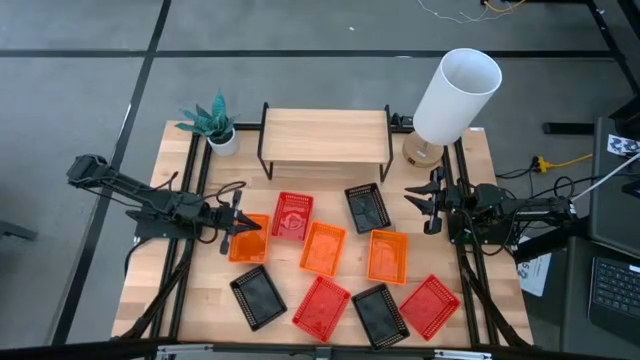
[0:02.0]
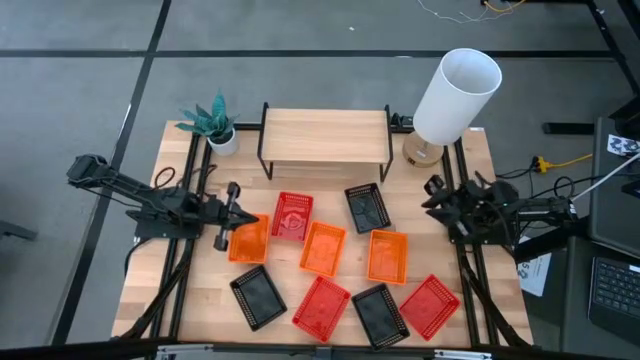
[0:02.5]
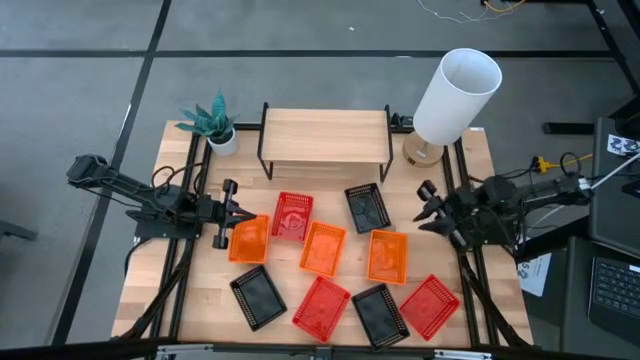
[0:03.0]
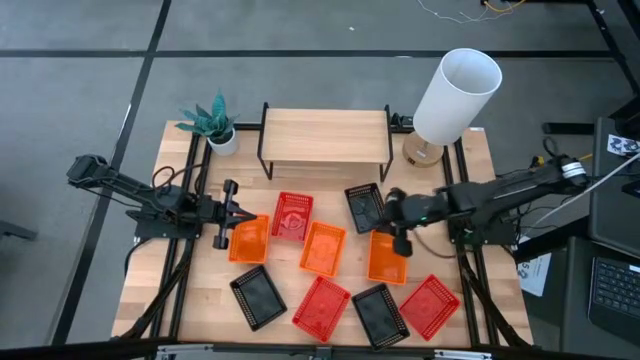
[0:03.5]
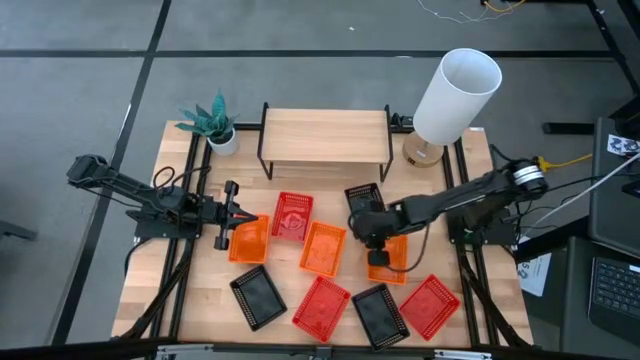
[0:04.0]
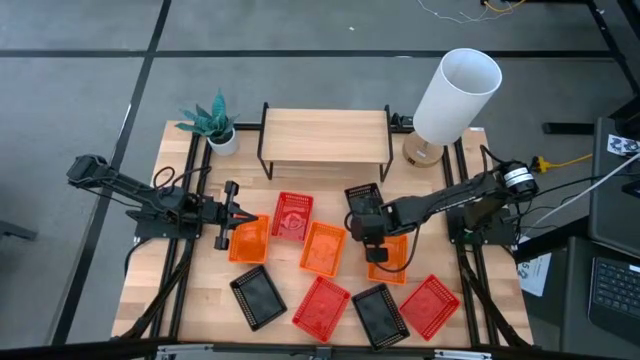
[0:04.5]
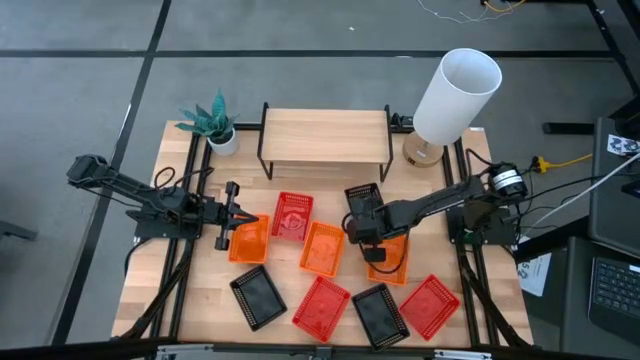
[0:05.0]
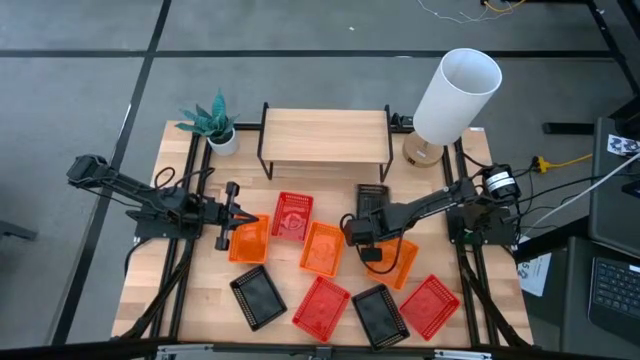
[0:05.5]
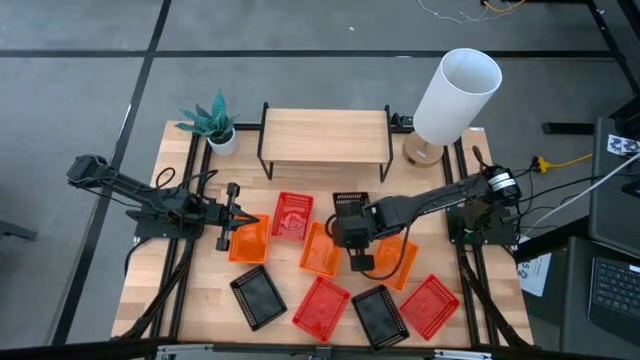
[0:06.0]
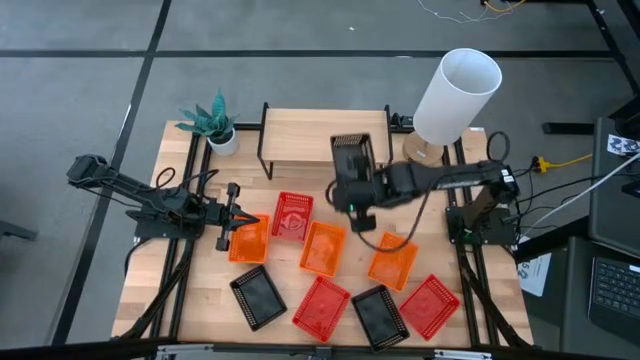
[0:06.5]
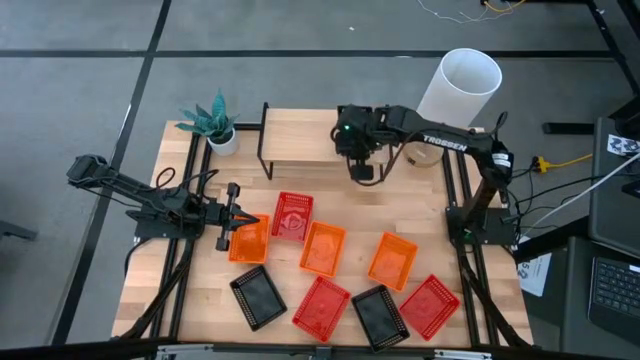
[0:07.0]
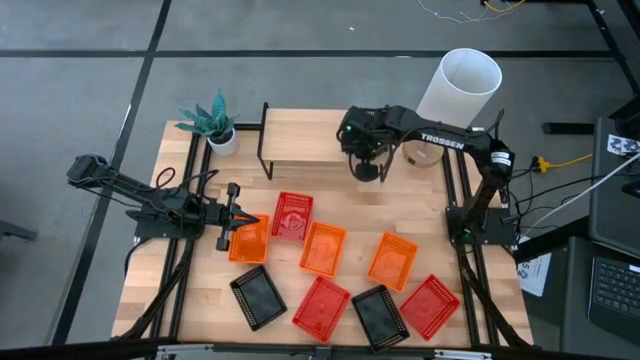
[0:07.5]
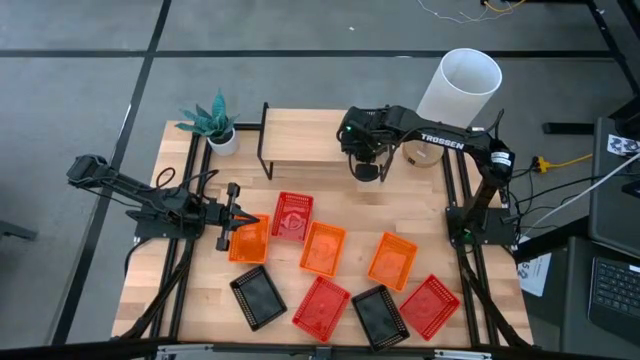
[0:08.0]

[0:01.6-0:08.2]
Task: Stack baskets on shelf by color
Put the top black bin on the shelf

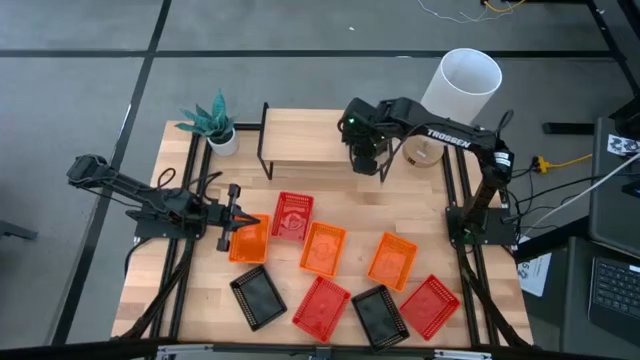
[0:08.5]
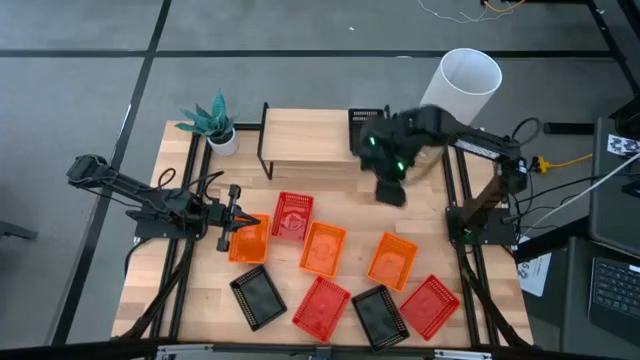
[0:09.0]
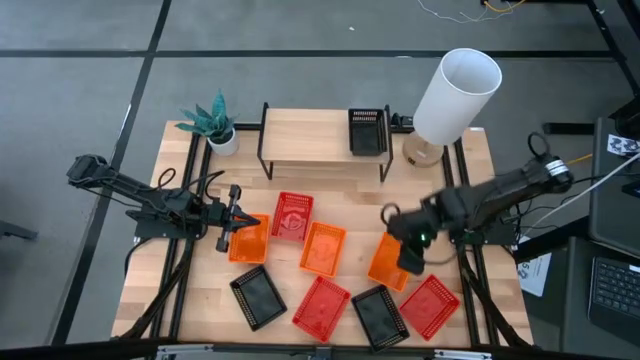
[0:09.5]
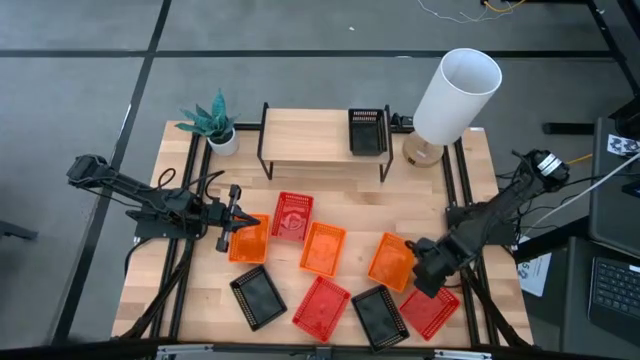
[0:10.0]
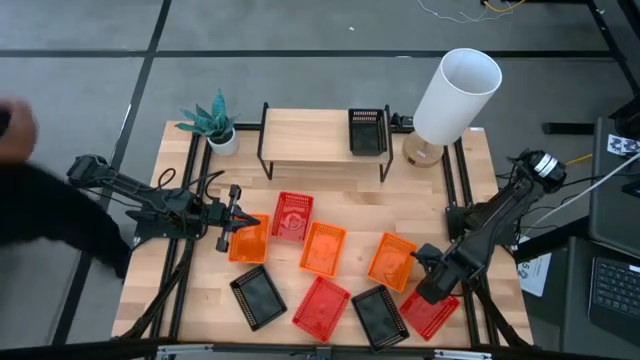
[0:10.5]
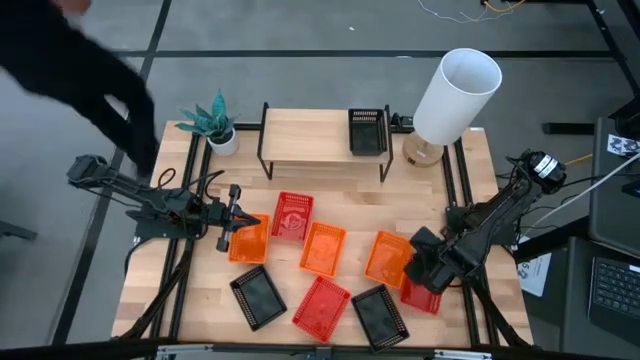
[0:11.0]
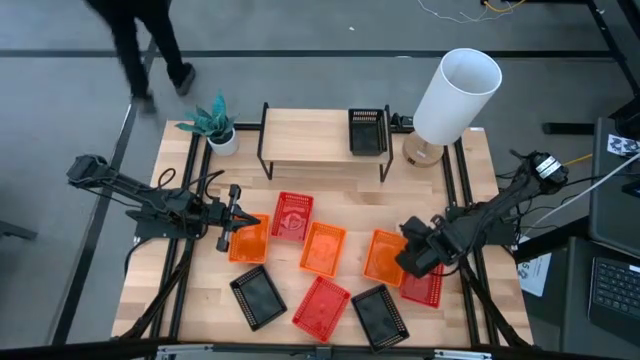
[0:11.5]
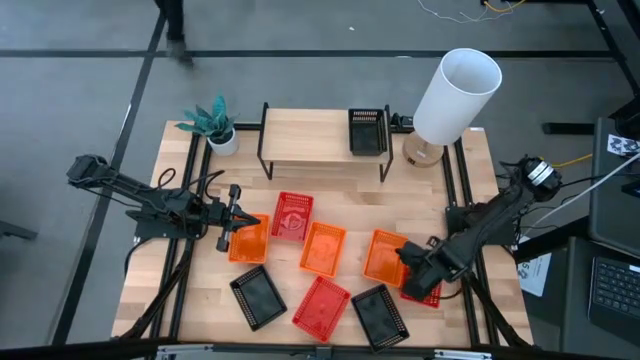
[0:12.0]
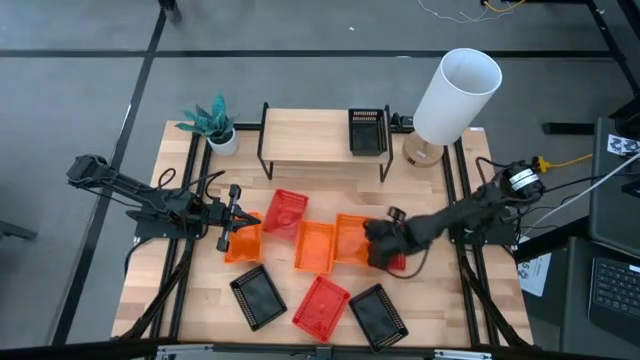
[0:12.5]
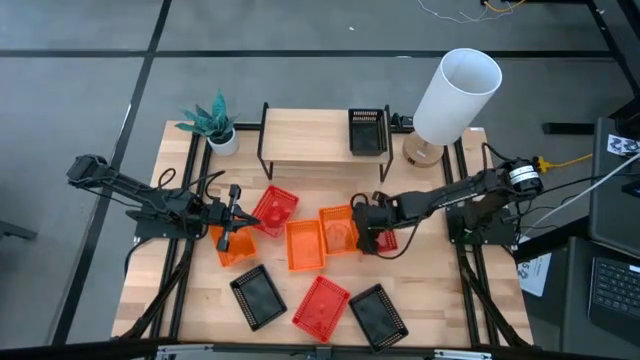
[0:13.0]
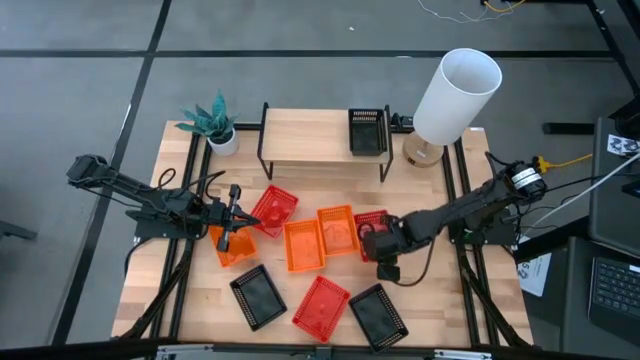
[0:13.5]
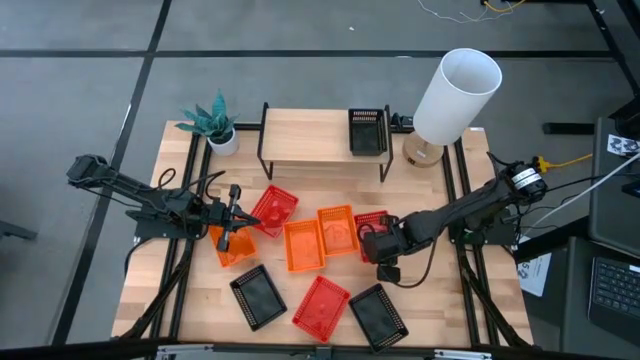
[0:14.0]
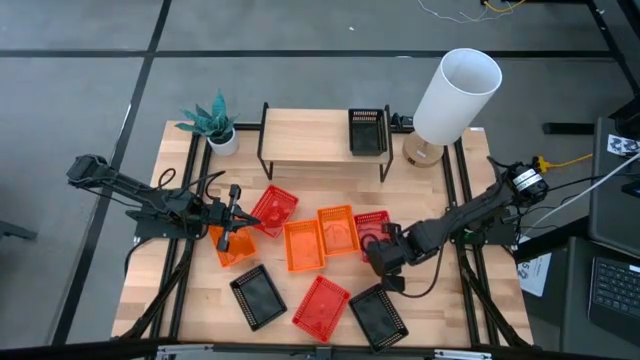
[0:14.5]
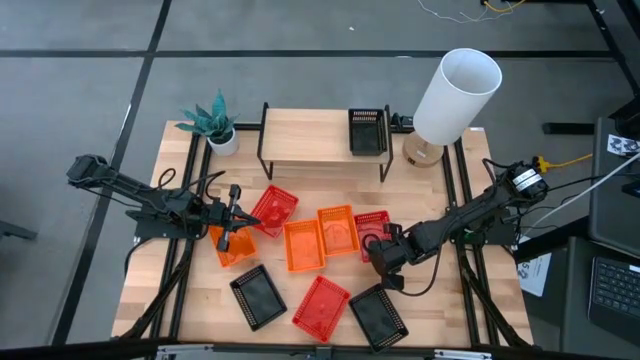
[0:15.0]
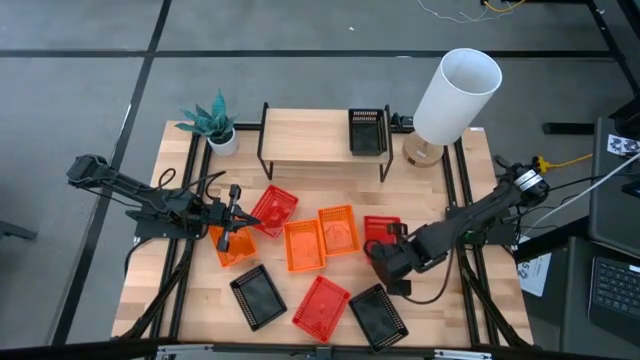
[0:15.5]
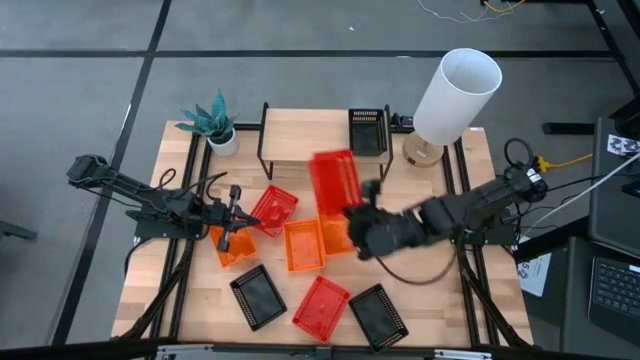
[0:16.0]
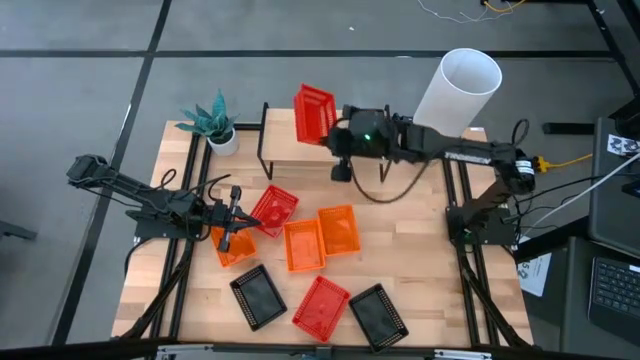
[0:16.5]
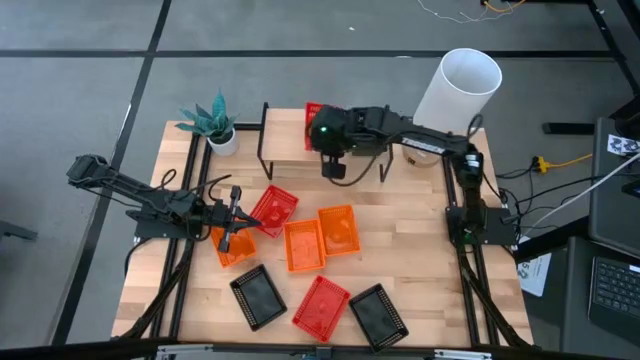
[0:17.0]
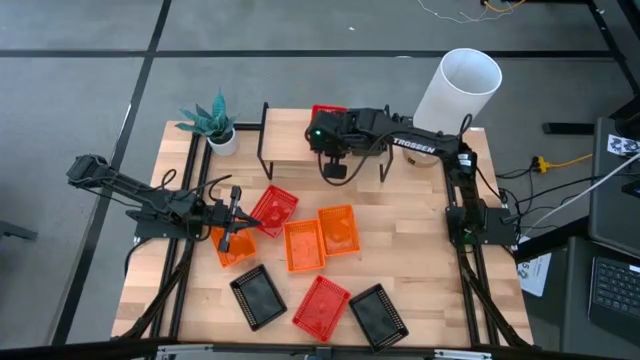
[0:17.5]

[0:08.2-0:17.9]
Put the bottom right red bin on the shelf

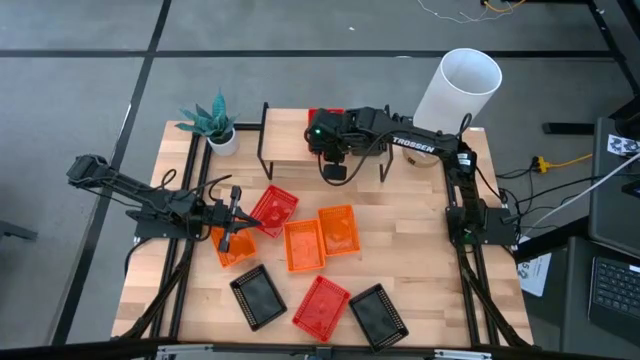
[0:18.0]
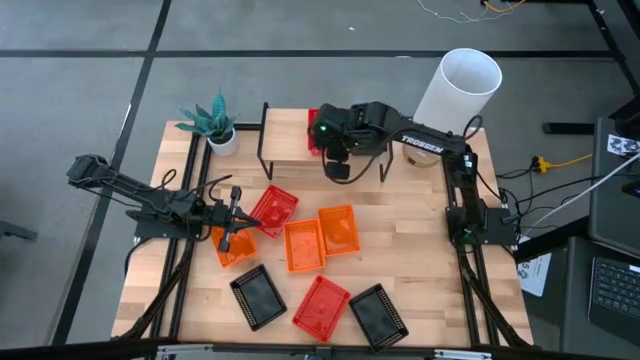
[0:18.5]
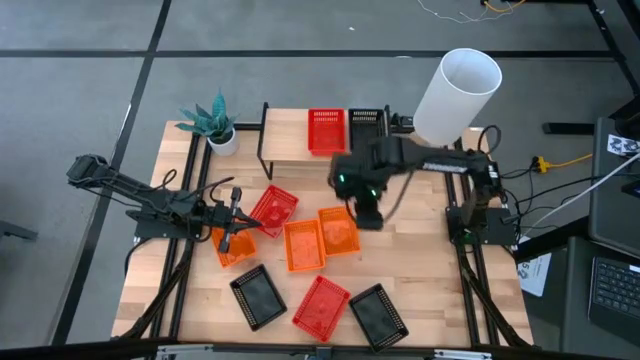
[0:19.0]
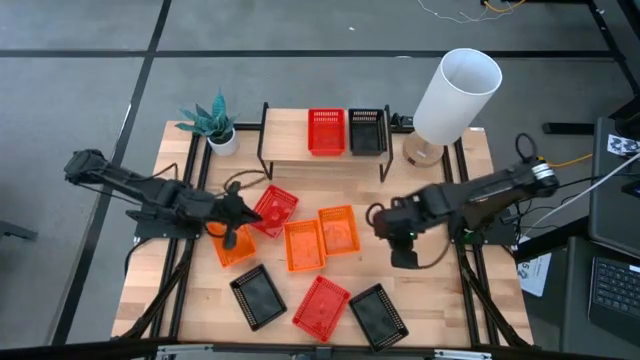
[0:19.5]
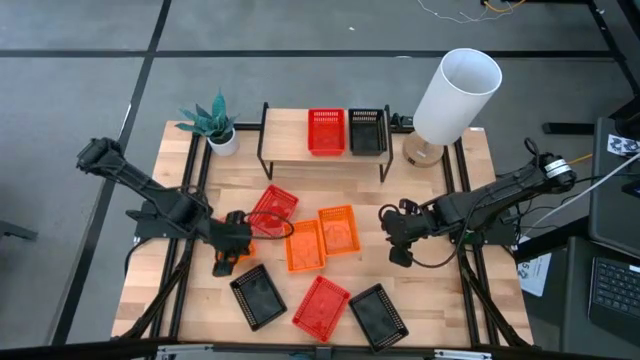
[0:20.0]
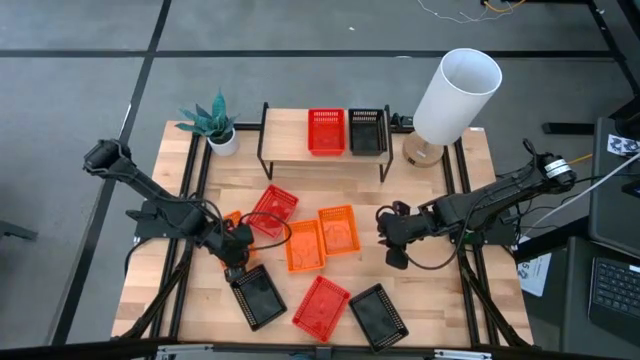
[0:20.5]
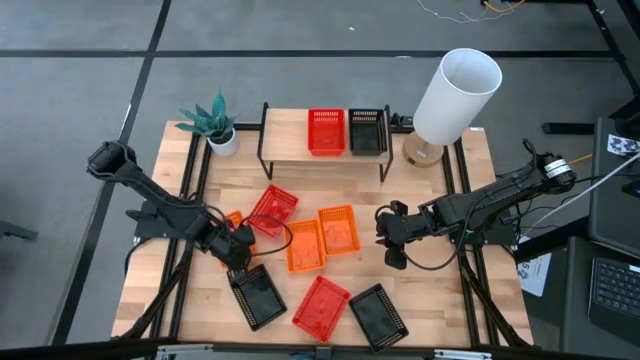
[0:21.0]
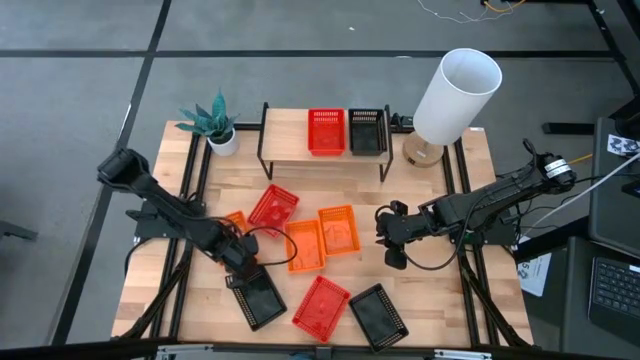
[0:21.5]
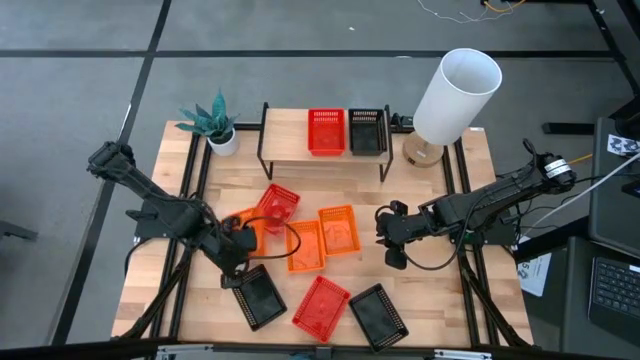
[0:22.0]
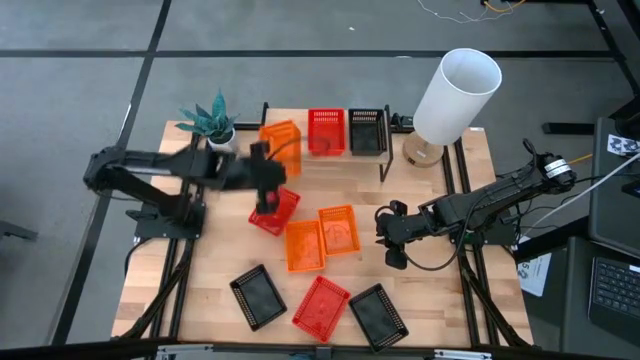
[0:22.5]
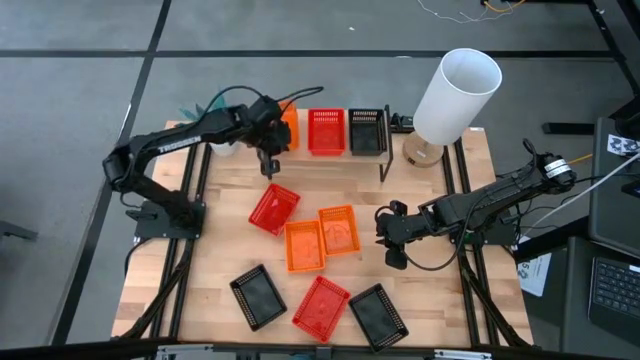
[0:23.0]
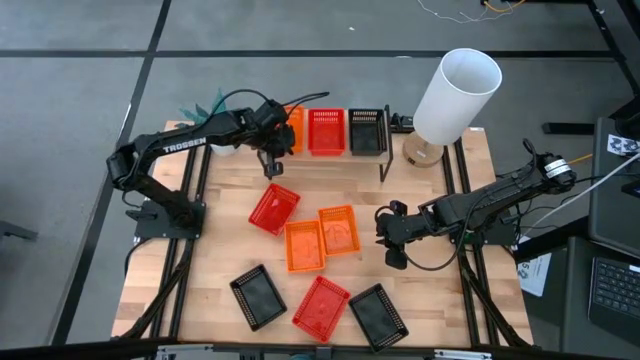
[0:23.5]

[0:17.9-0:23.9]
Put the left orange bin on the shelf
